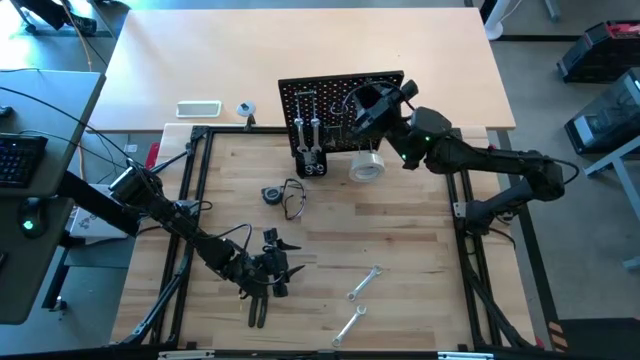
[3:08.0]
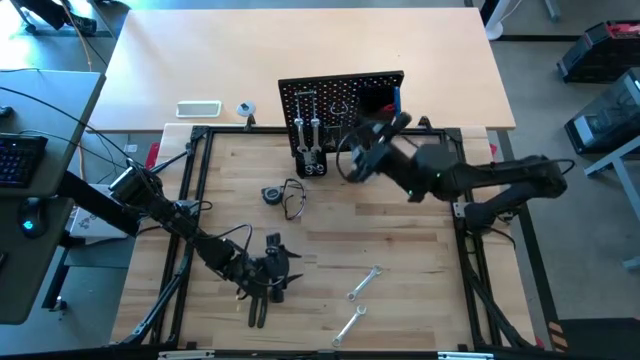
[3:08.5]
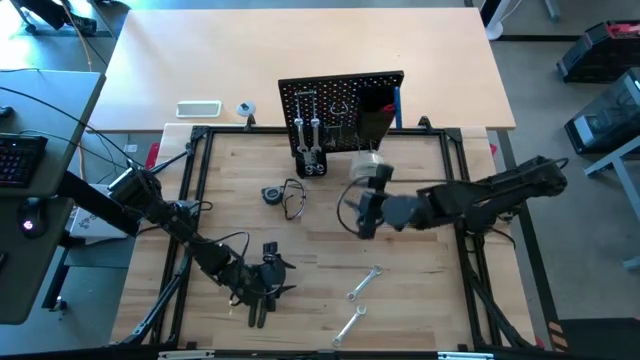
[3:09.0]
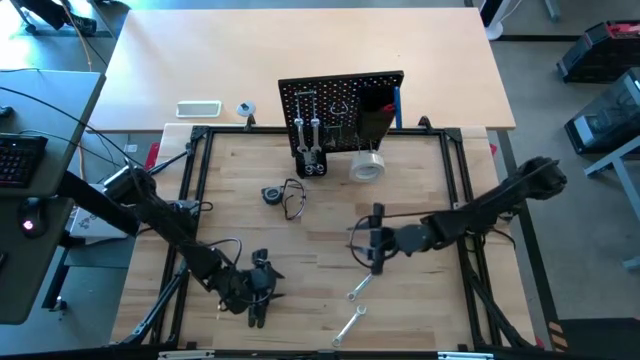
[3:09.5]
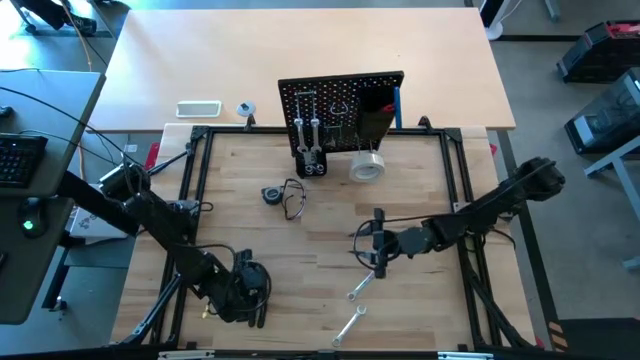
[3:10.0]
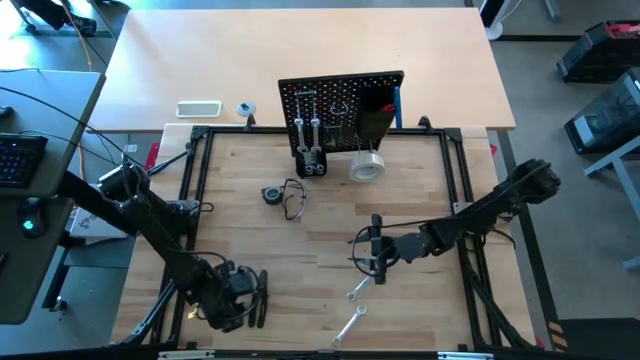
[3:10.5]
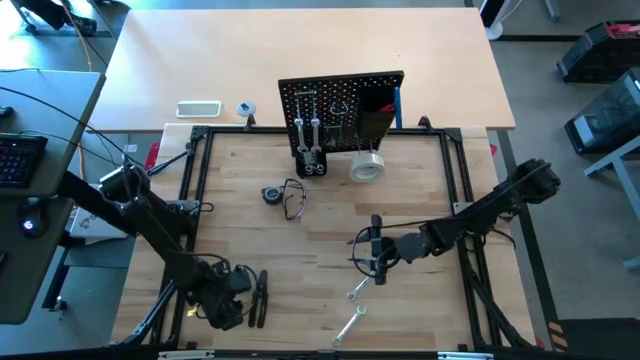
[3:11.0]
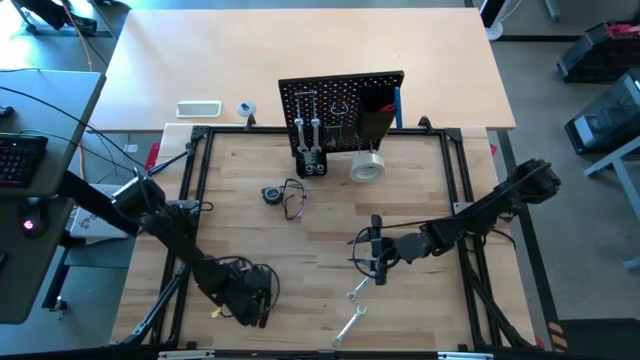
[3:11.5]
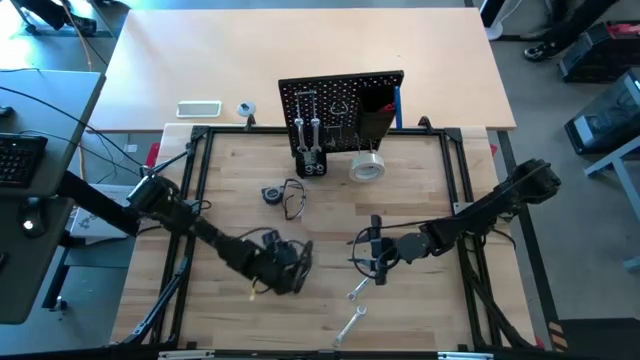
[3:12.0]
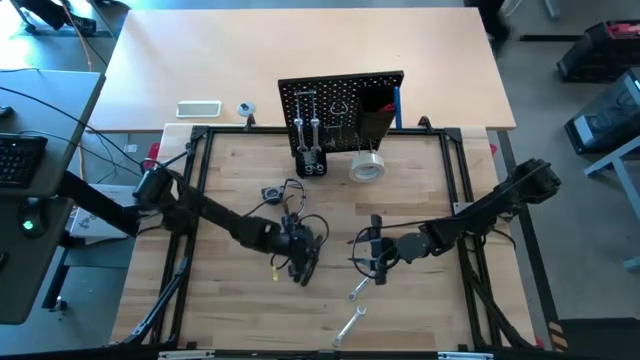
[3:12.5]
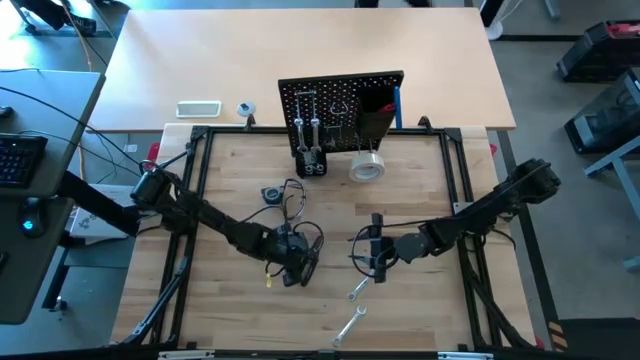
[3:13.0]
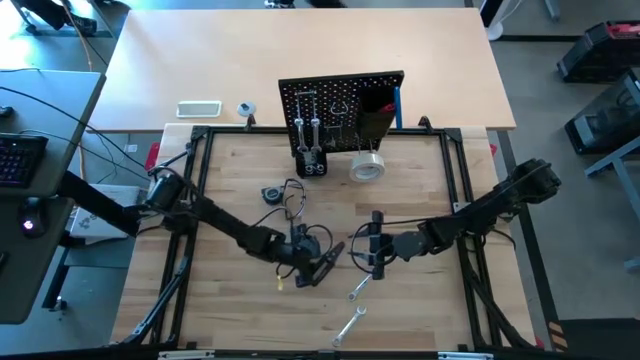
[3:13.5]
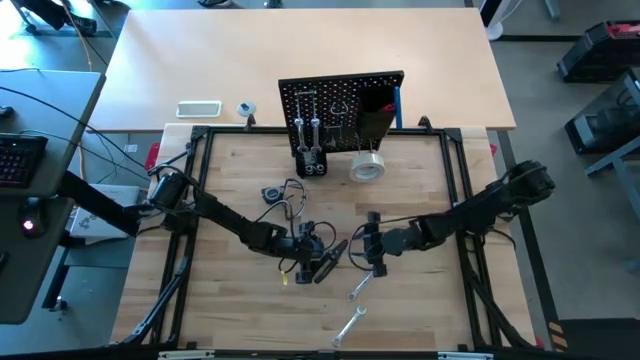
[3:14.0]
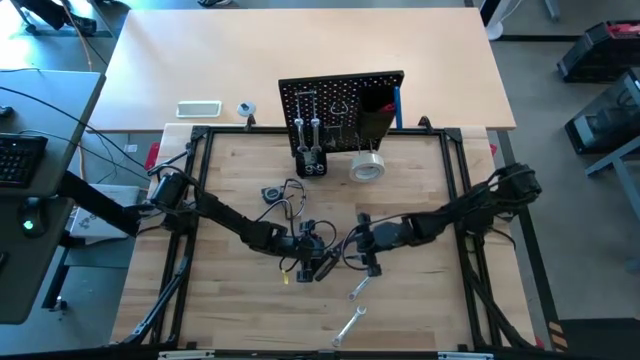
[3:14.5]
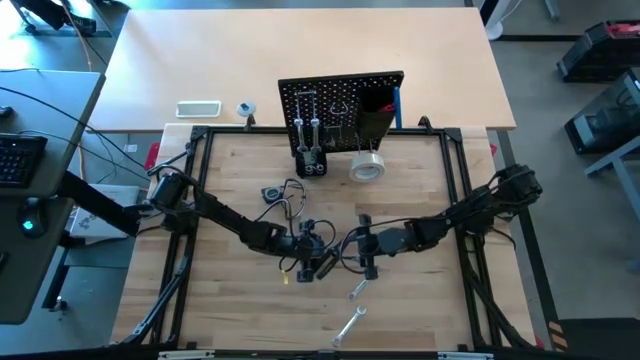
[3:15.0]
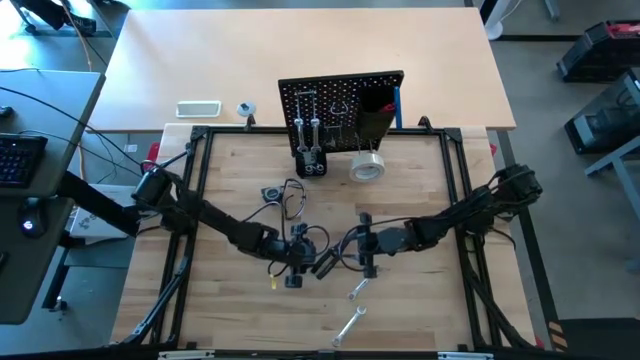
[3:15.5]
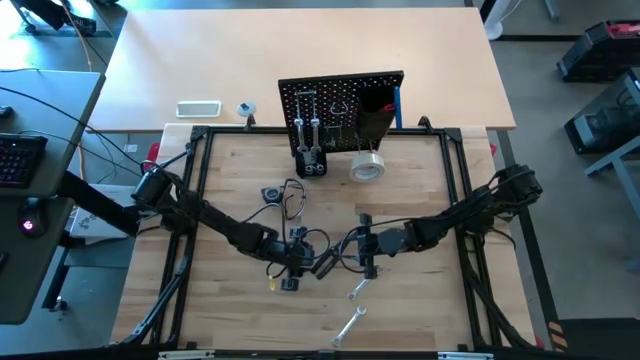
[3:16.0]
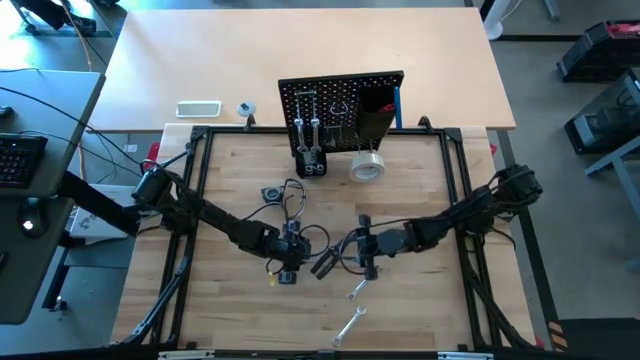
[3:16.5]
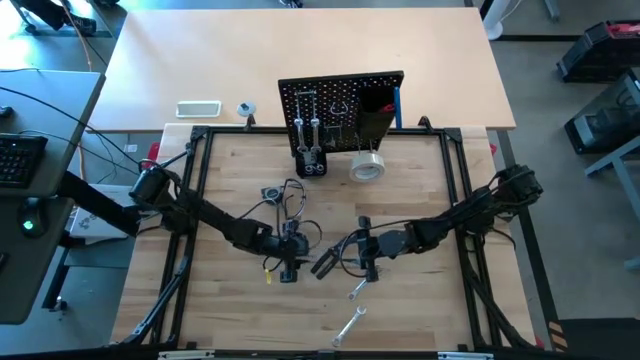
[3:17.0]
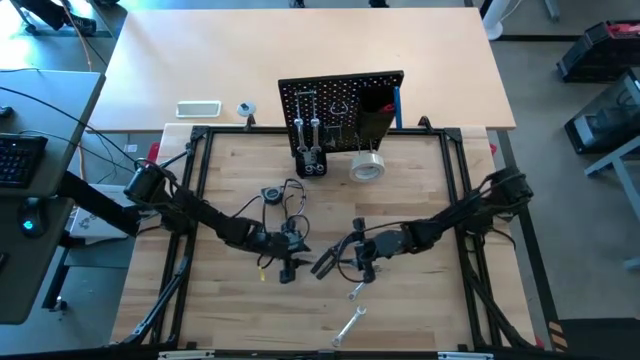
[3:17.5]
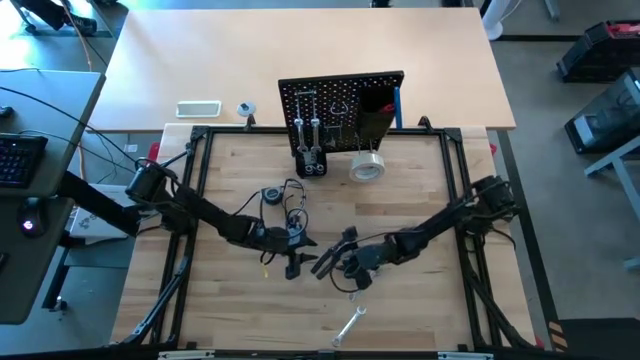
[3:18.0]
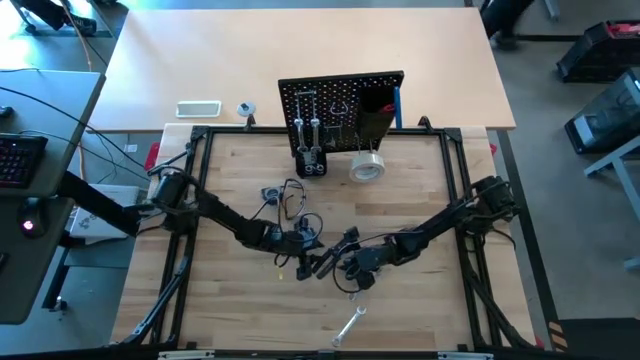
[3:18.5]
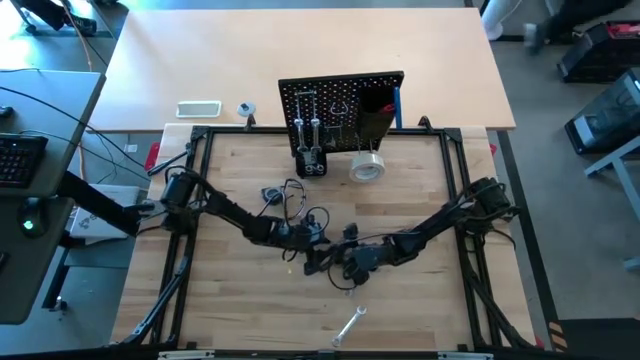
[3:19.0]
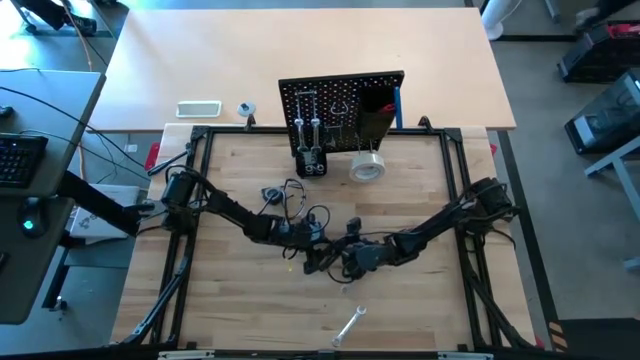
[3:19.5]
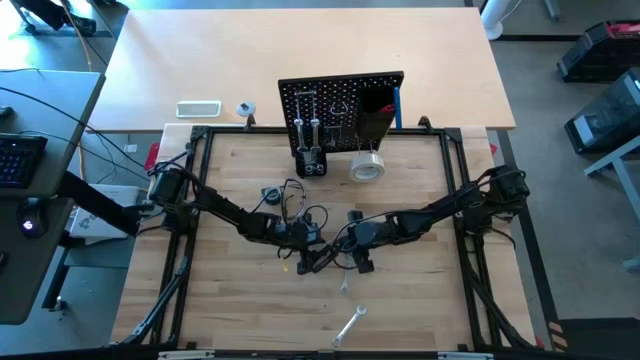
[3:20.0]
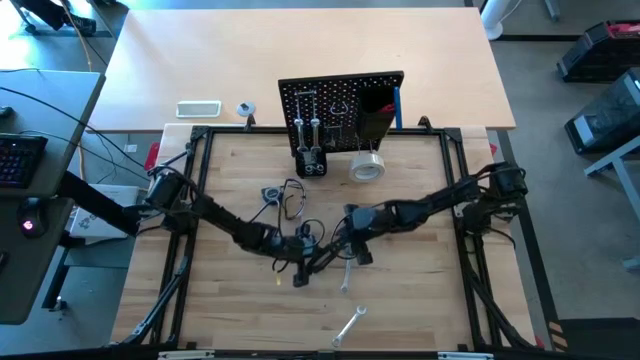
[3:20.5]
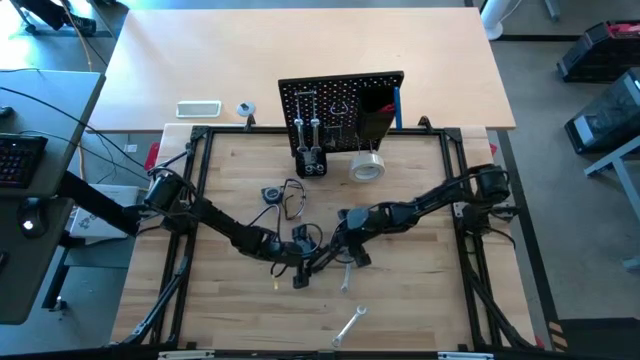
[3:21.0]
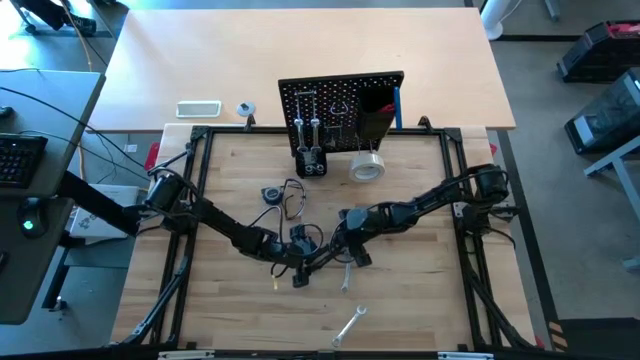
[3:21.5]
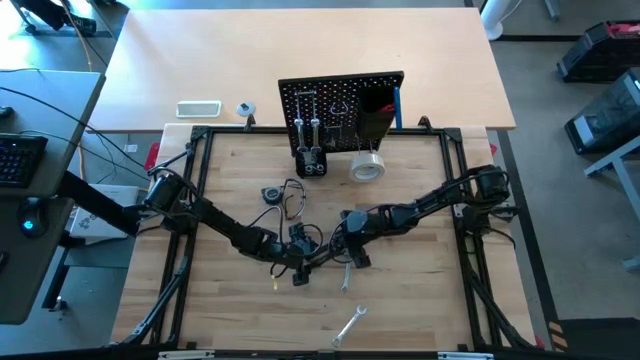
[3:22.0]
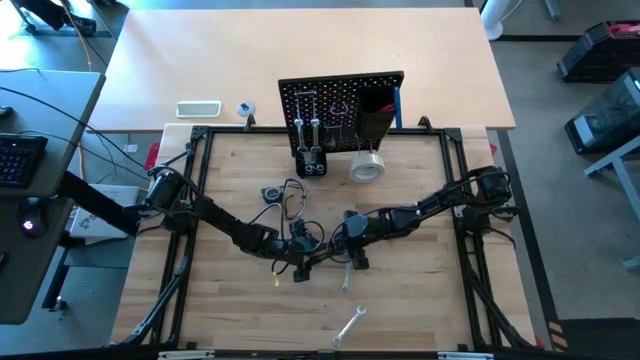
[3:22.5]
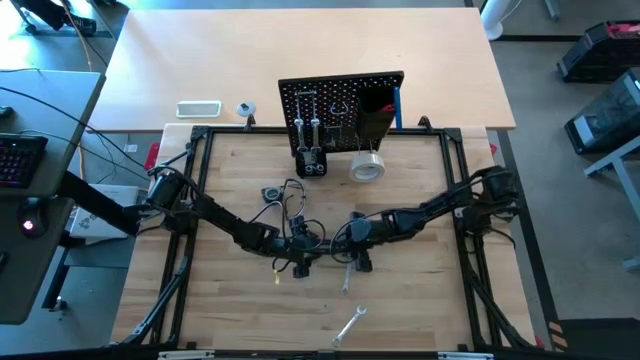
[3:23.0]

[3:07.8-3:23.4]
Task: Hang tools onto peg board
Put the black wire stripper into the top black bin on the pegboard

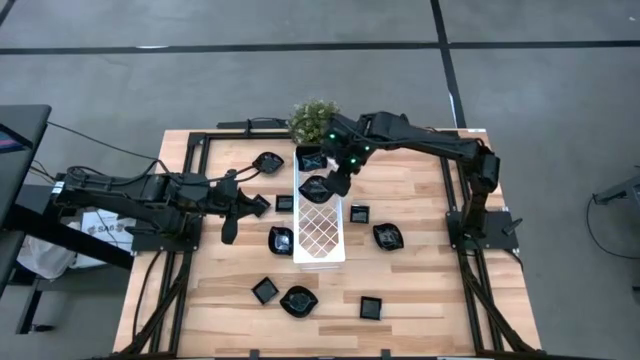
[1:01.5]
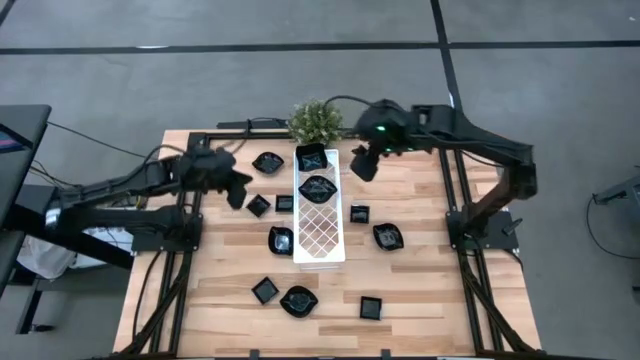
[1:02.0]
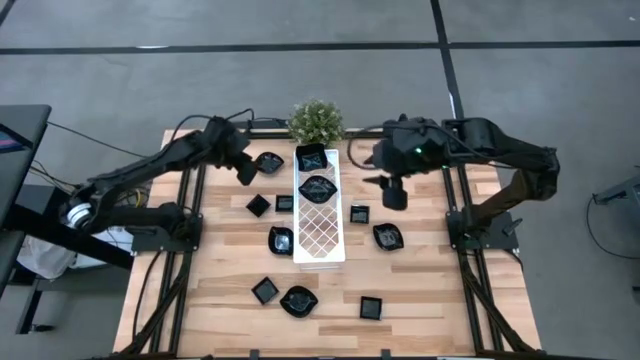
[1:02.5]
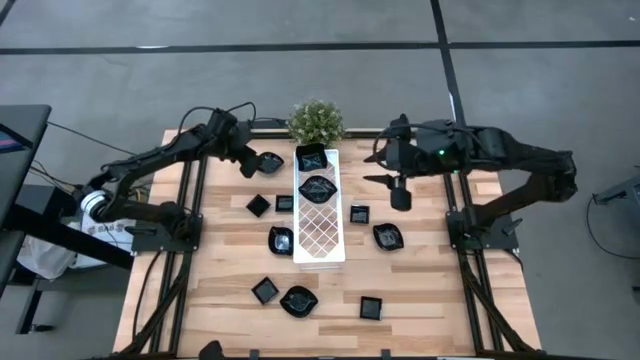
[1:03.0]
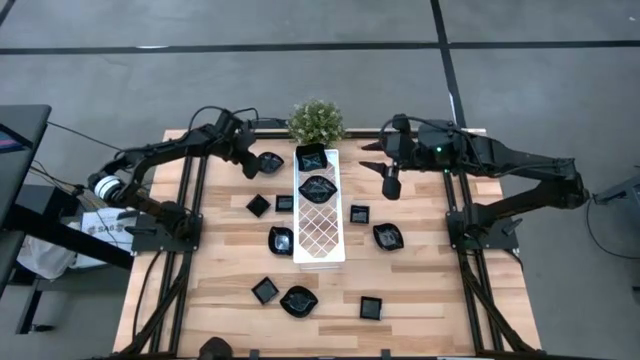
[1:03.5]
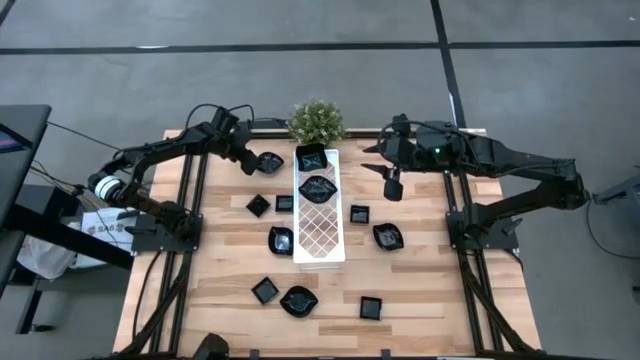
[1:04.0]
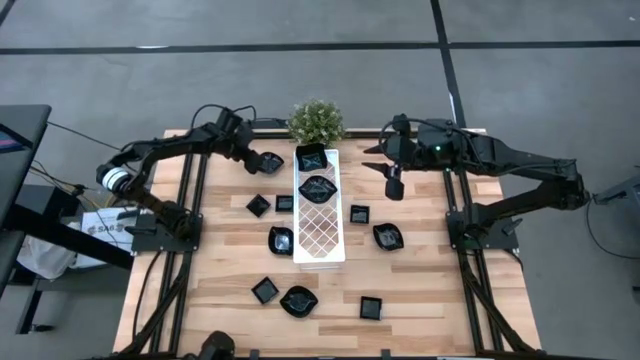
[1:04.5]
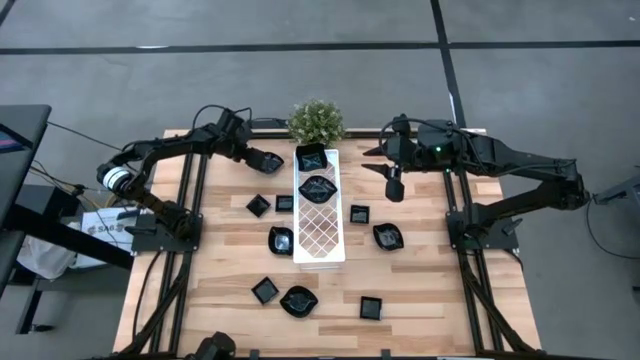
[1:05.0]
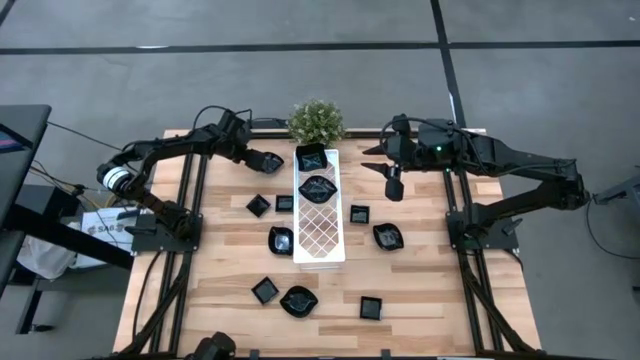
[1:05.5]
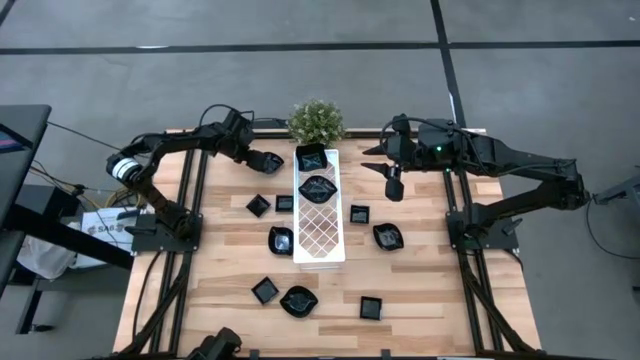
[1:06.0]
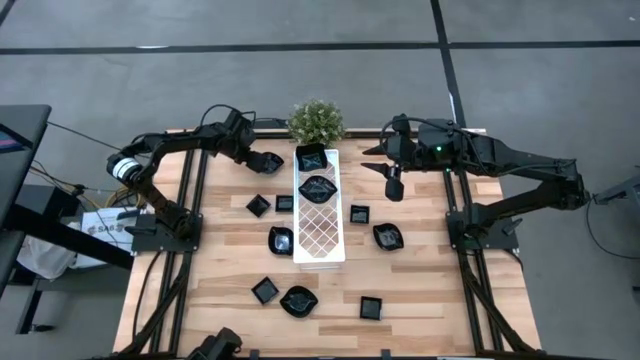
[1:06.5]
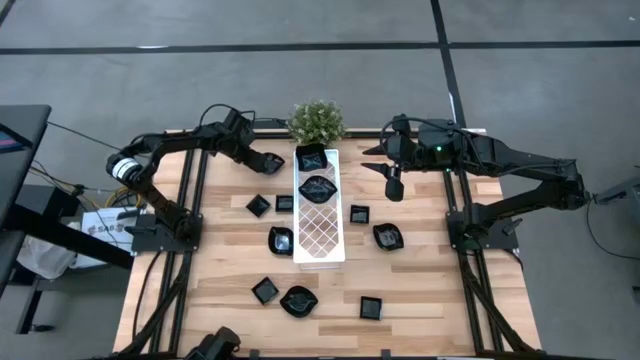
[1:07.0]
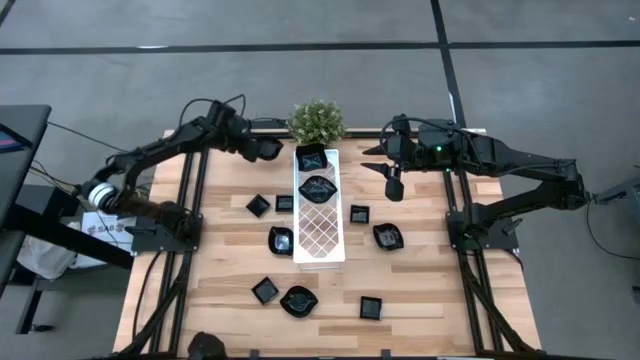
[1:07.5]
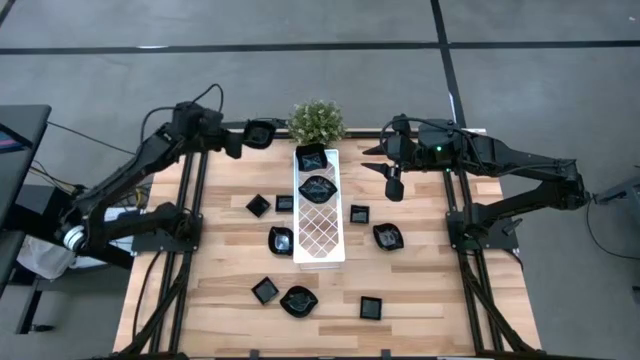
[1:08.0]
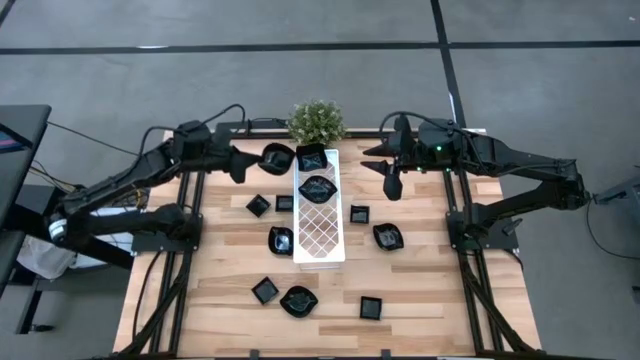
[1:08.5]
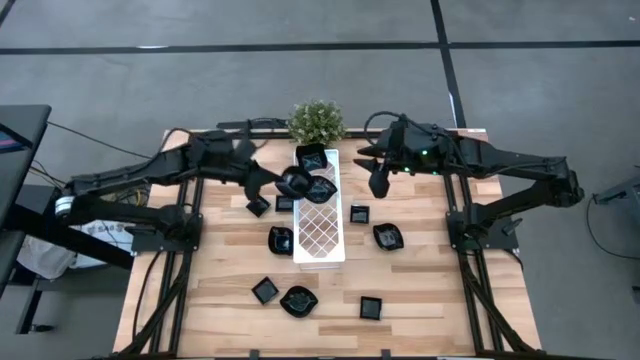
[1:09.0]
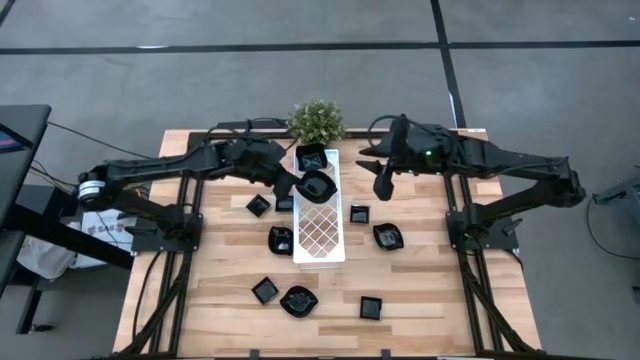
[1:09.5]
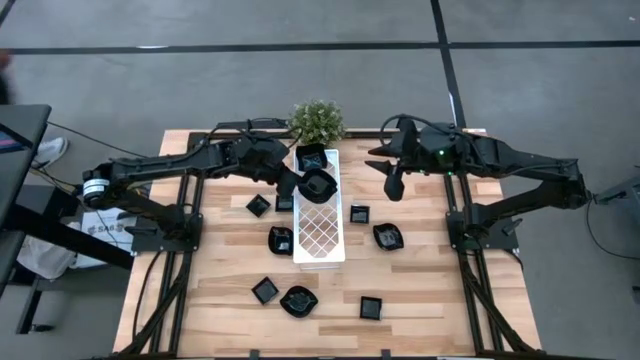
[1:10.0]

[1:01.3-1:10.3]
Task: Pick & Place Mini shaped plates
Stack the leaf-shaped plate on the other leaf-shaped plate on the shelf
